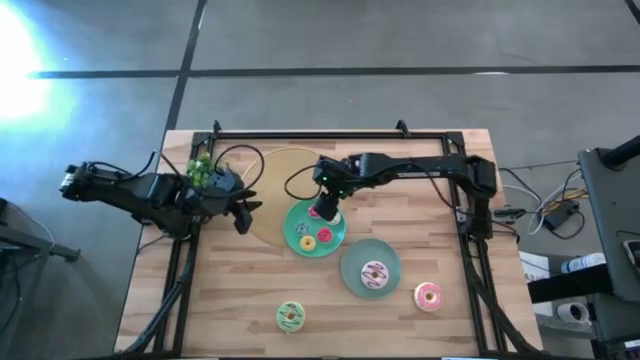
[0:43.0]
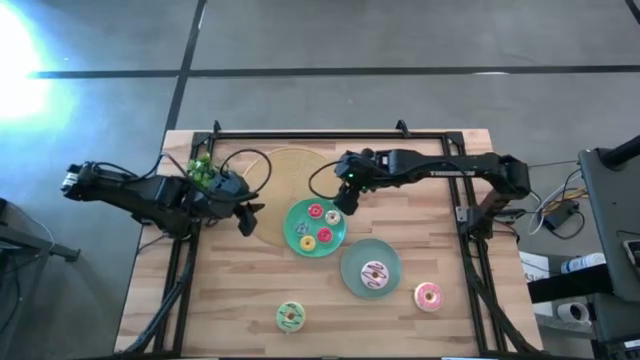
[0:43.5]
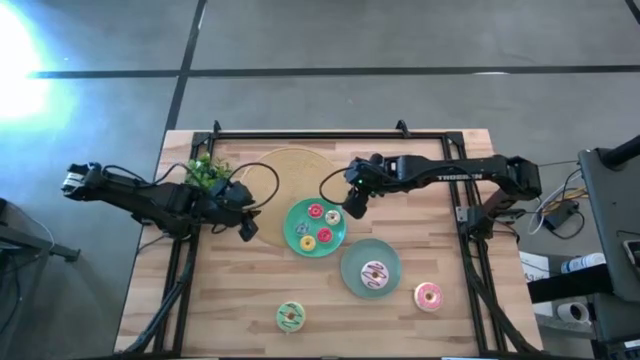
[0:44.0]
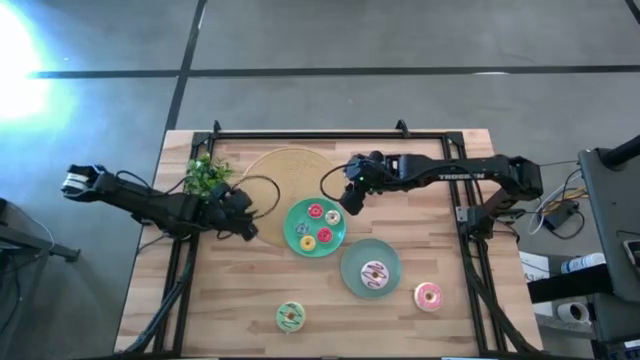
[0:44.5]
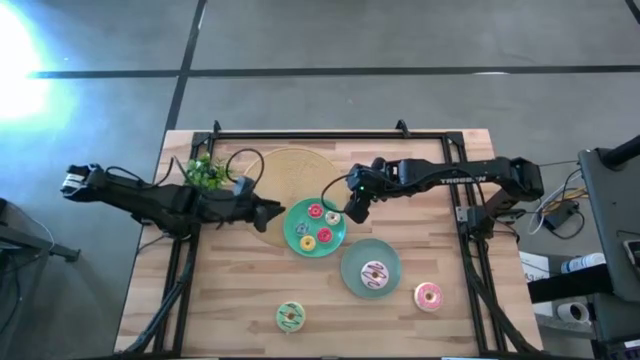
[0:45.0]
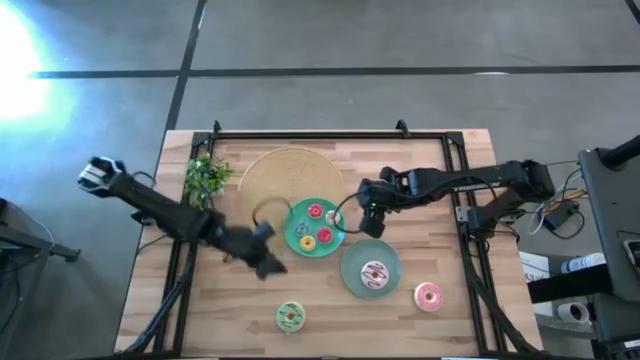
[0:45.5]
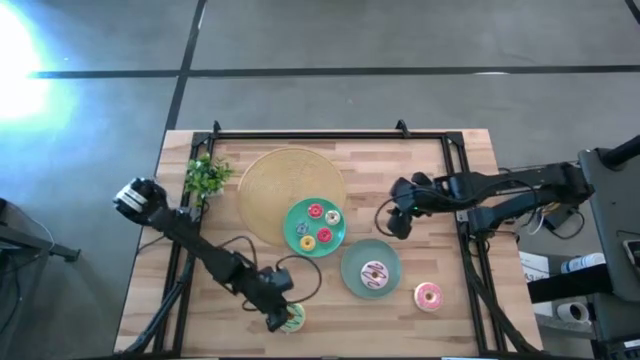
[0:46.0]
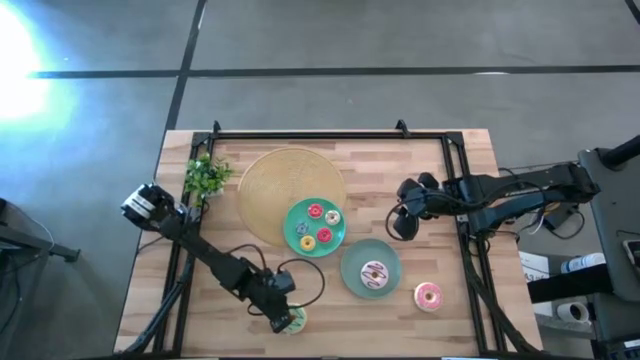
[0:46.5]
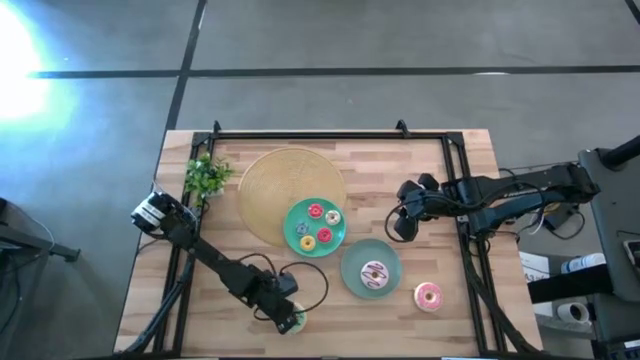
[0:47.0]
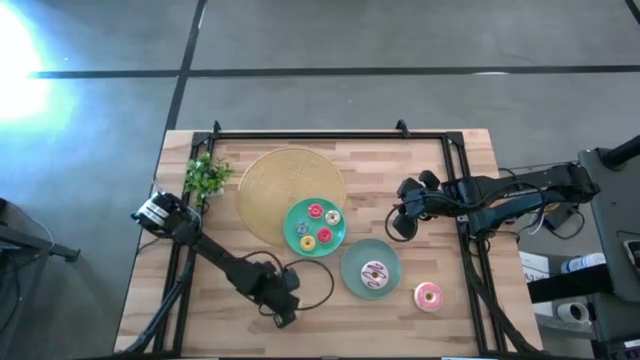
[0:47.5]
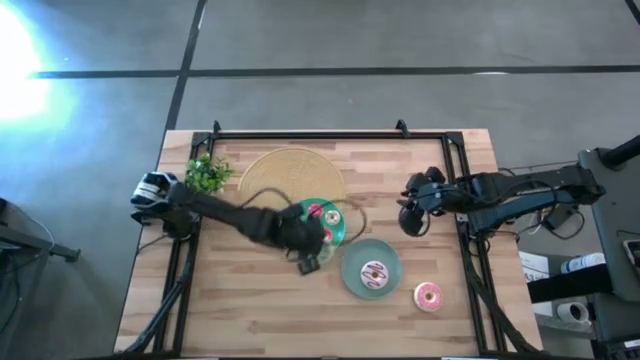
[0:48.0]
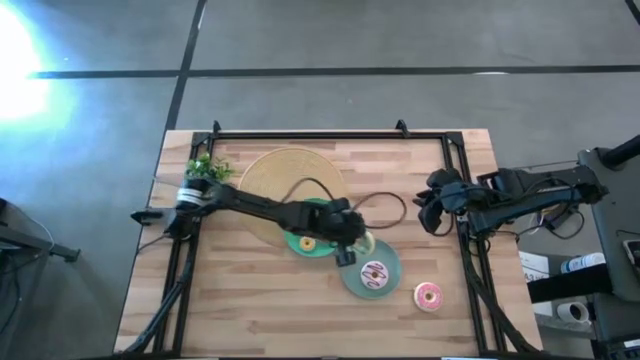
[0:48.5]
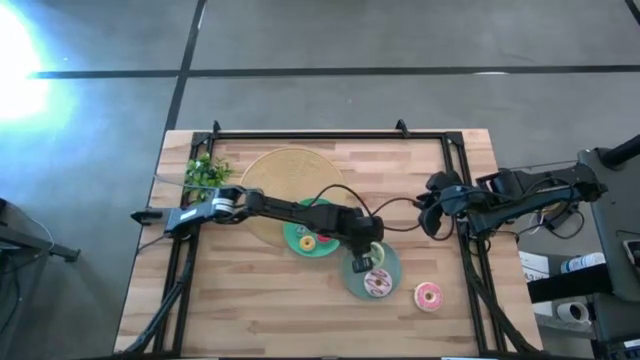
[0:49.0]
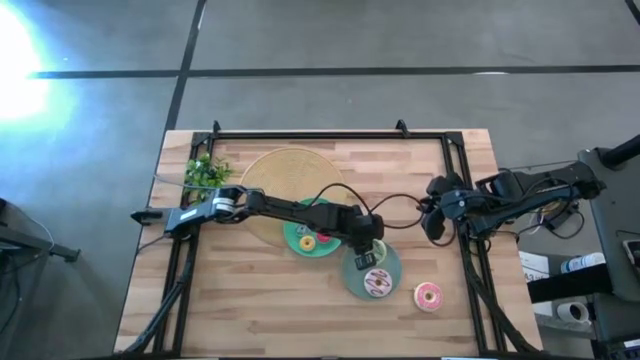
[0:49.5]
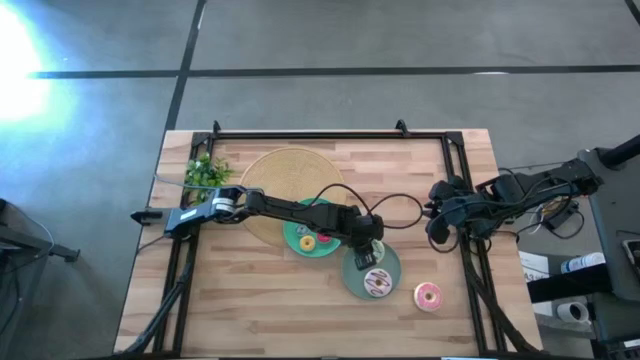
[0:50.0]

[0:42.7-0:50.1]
Task: Pick & Place donuts
Put the big light blue doughnut on the green plate

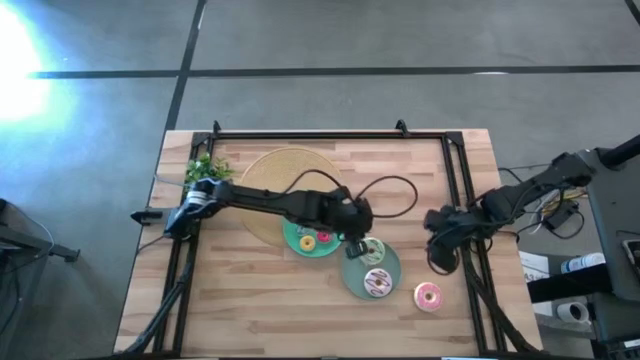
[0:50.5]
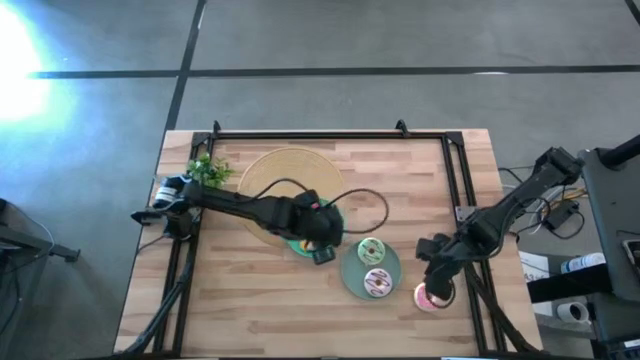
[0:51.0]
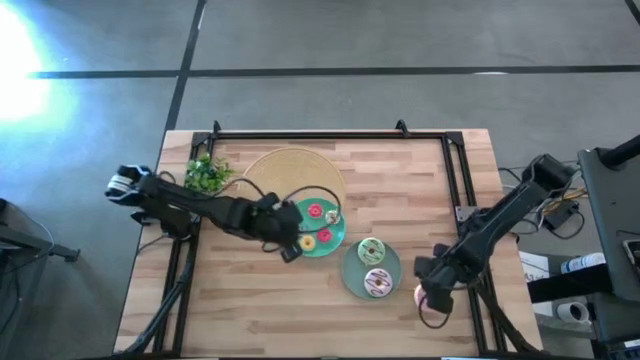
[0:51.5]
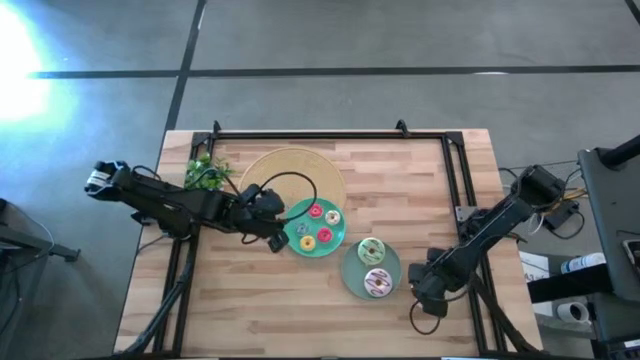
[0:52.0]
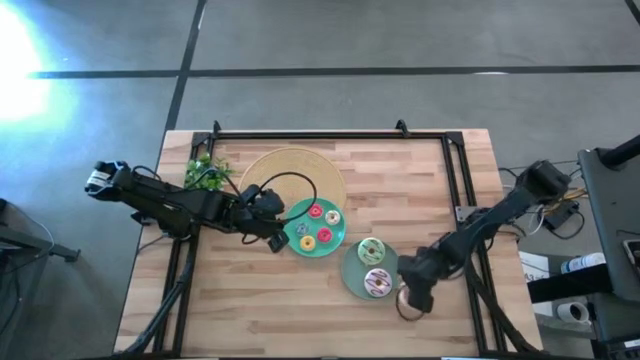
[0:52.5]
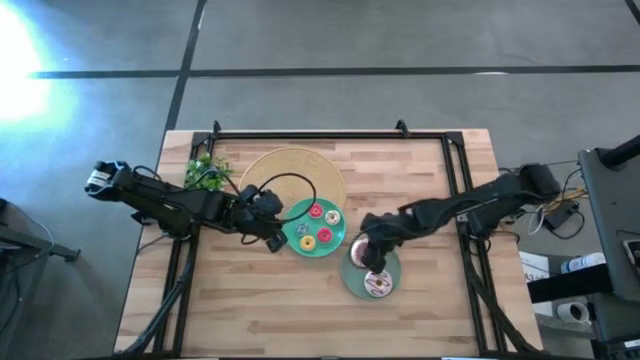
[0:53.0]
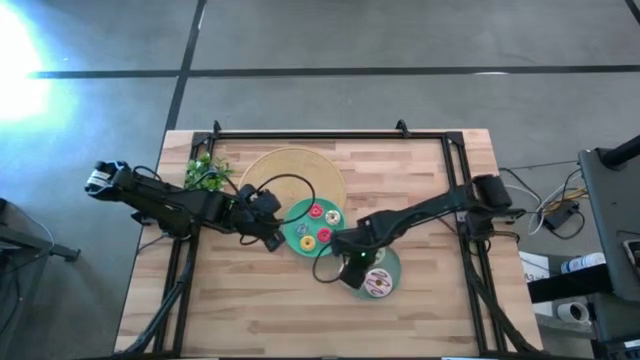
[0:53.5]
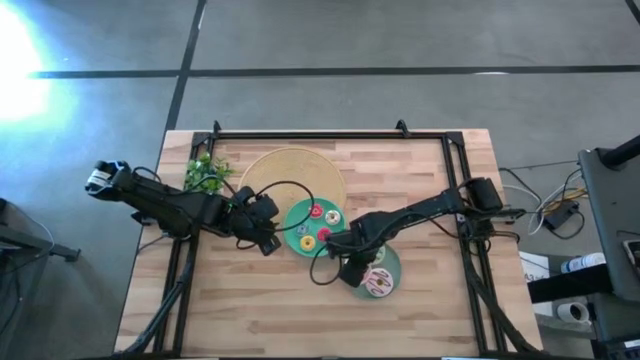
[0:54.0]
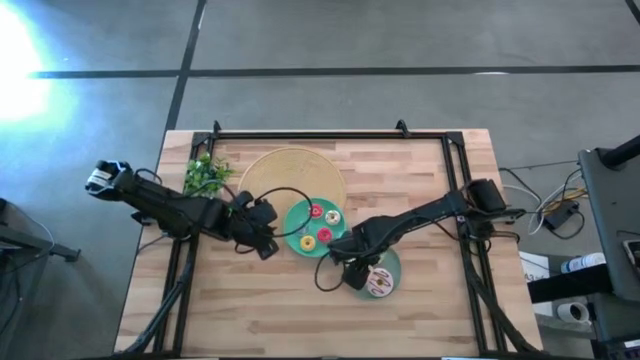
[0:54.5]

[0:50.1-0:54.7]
Put the big pink doughnut on the green plate

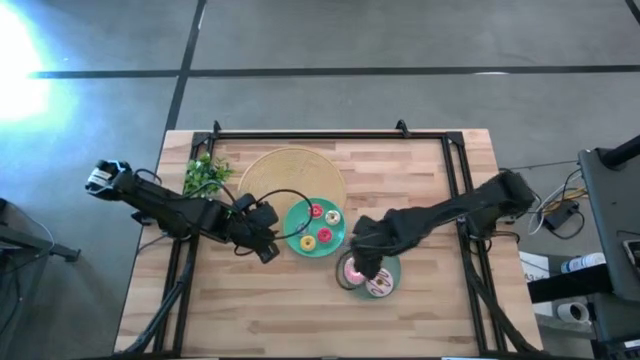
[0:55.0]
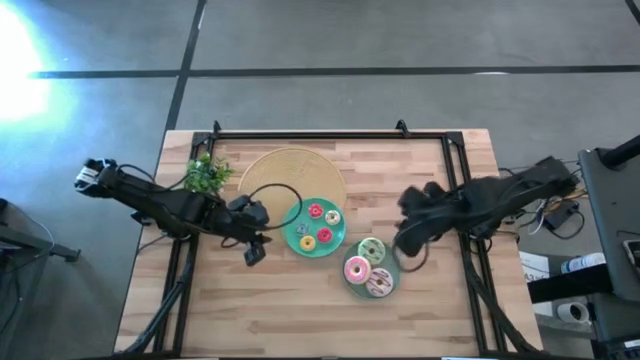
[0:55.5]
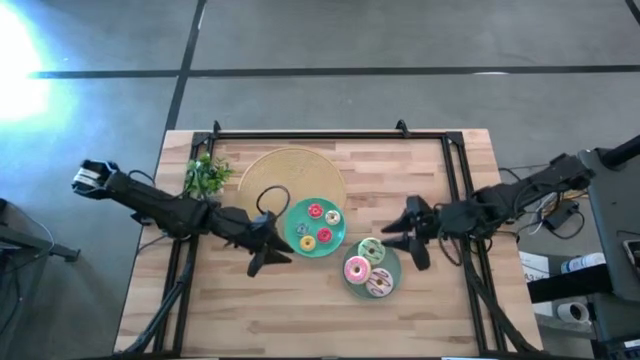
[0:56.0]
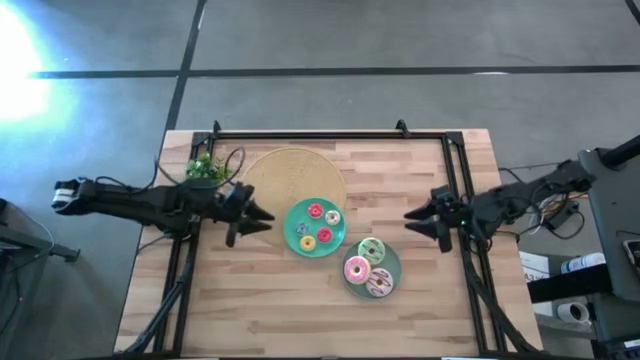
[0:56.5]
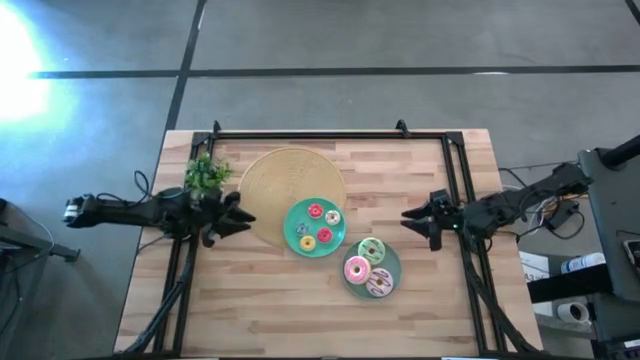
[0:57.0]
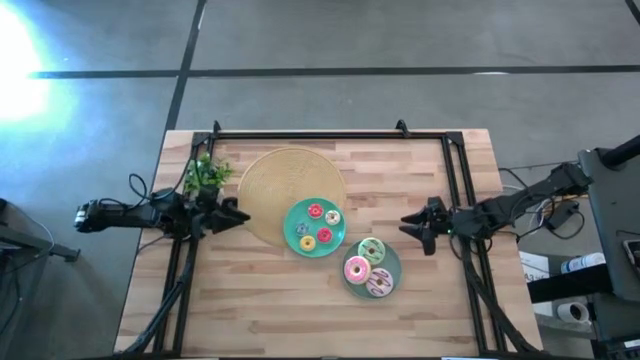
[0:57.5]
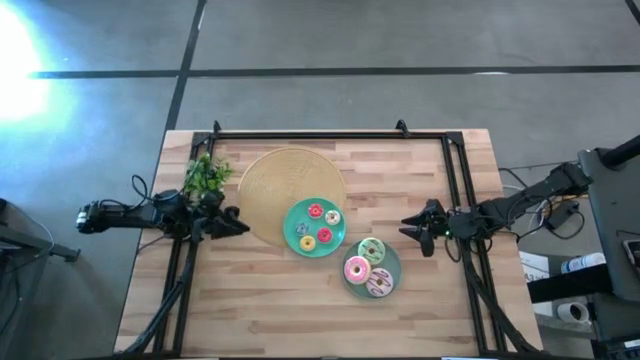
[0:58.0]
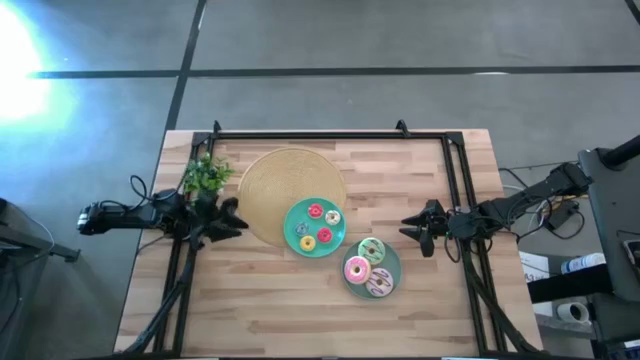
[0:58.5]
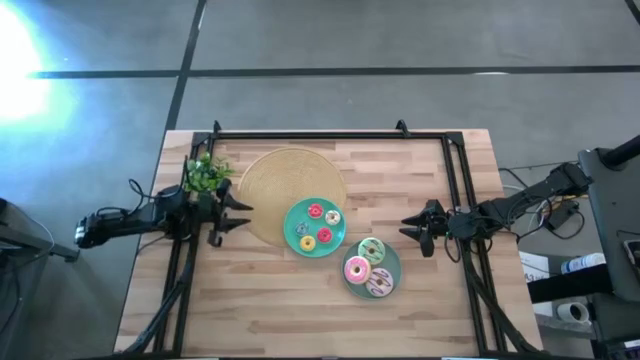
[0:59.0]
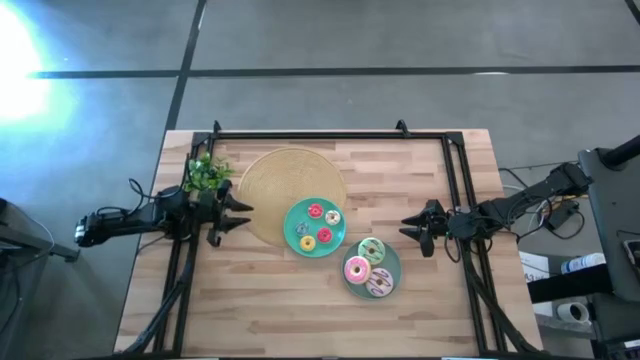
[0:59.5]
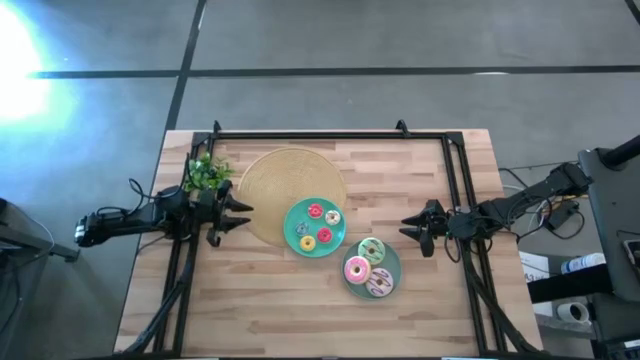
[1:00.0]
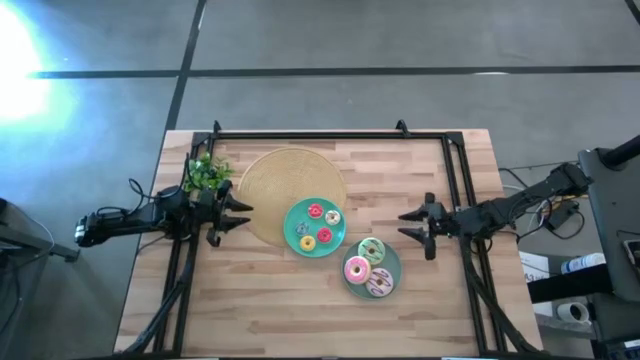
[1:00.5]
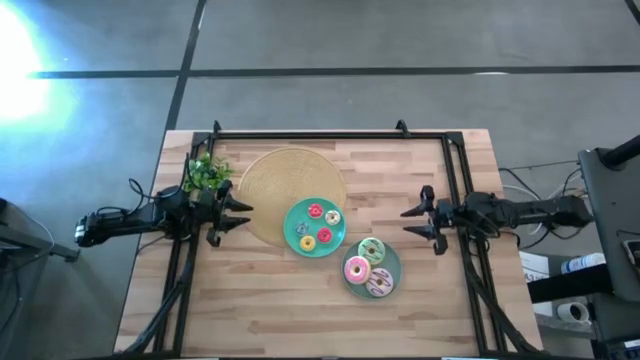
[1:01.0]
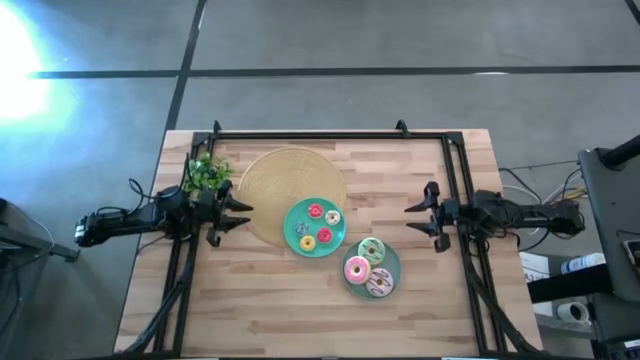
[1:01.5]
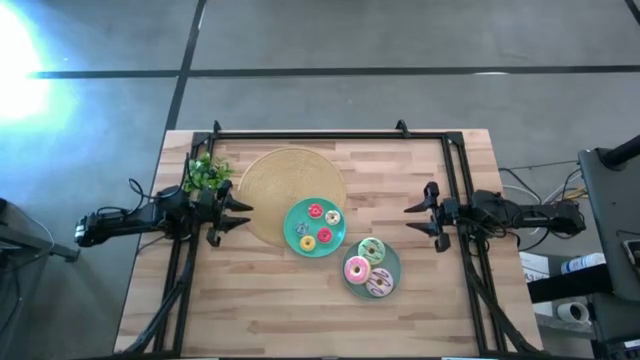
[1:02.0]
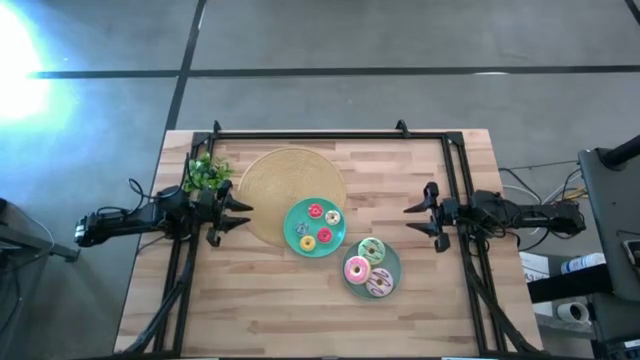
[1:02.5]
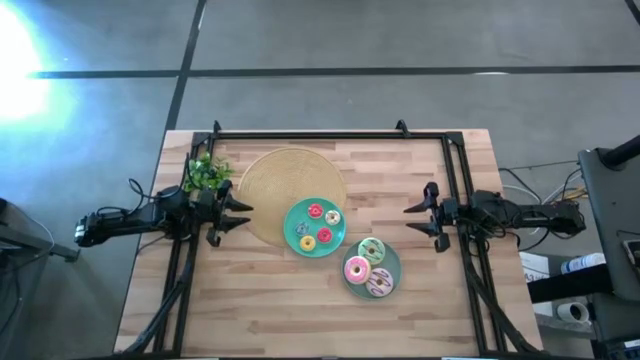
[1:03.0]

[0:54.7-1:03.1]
Return to Home Position

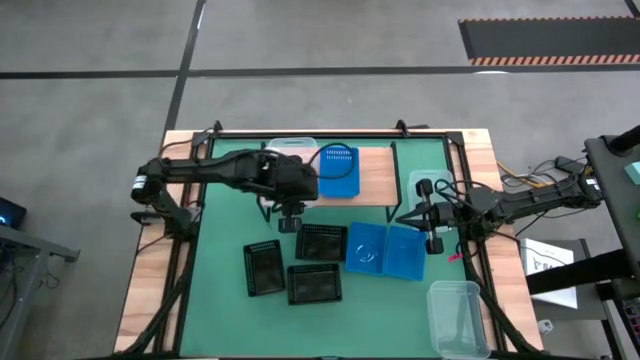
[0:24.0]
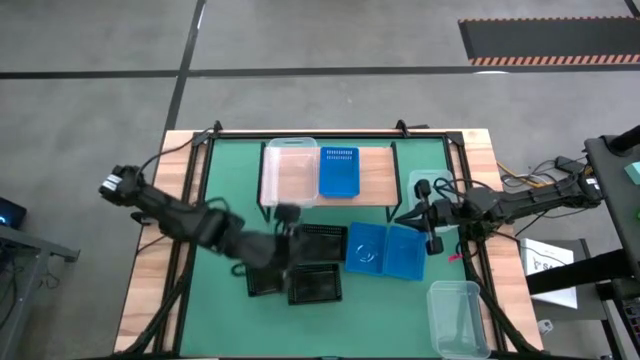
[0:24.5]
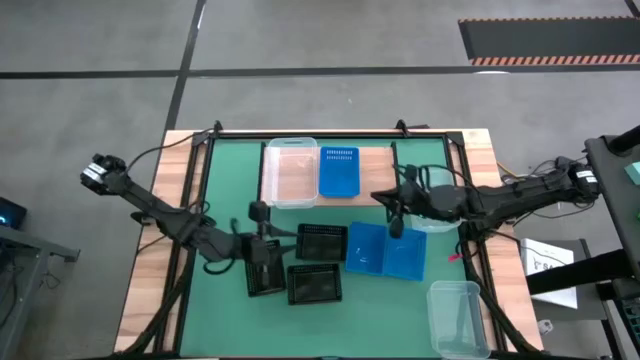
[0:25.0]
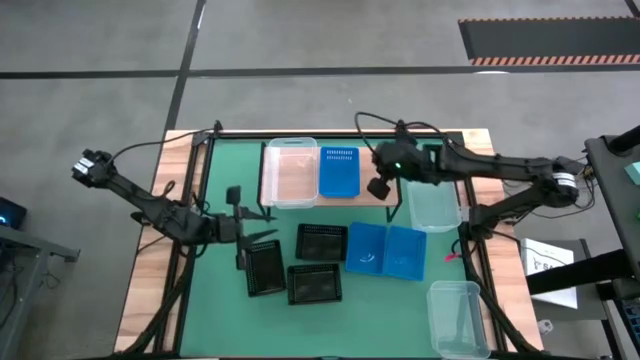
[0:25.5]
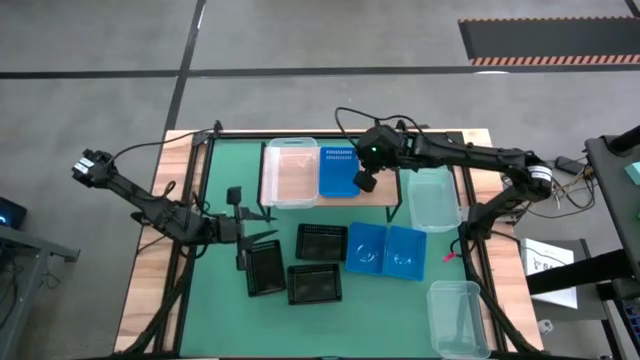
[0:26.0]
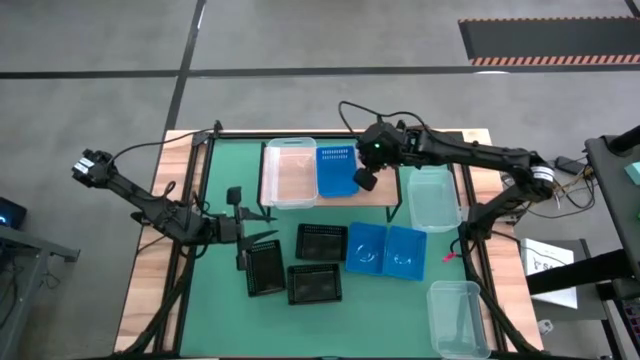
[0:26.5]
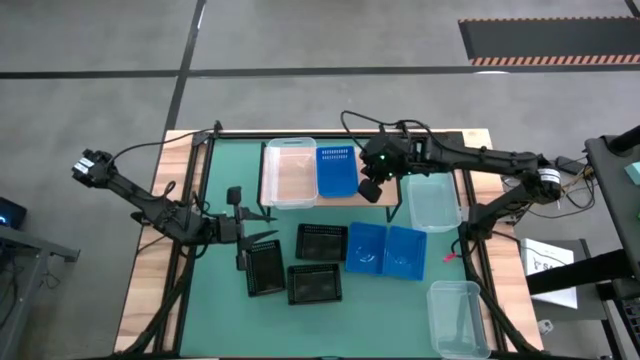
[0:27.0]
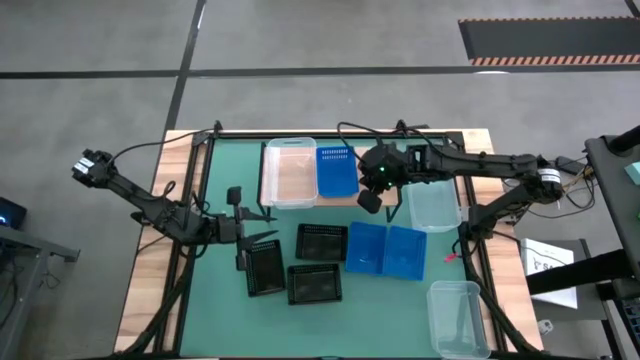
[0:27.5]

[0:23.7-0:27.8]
Task: Stack baskets on shelf by color
Adjust the blue bin on the shelf
